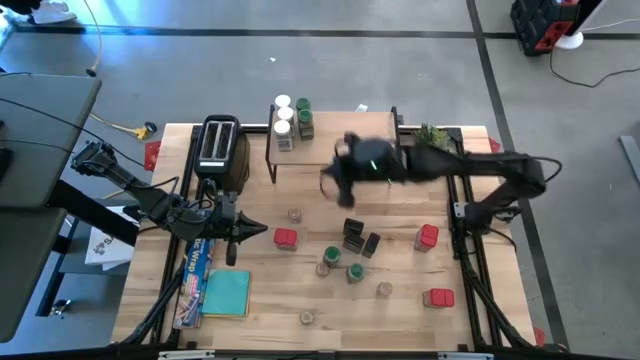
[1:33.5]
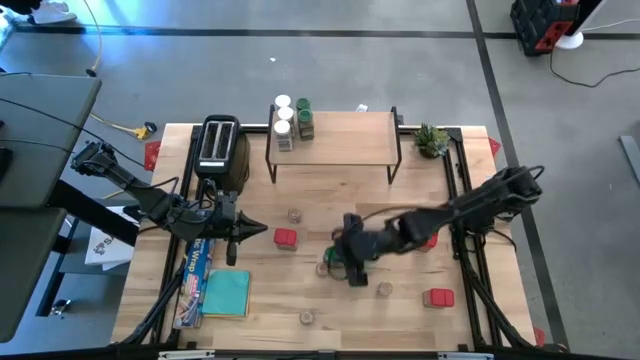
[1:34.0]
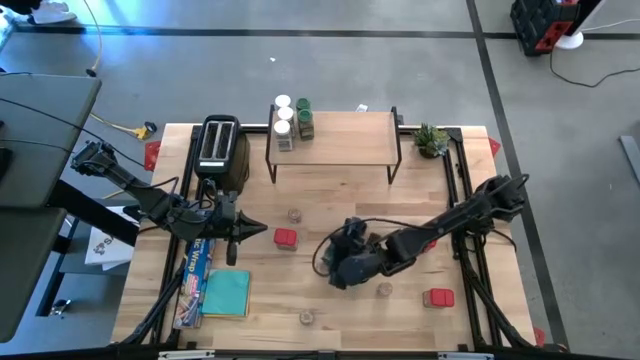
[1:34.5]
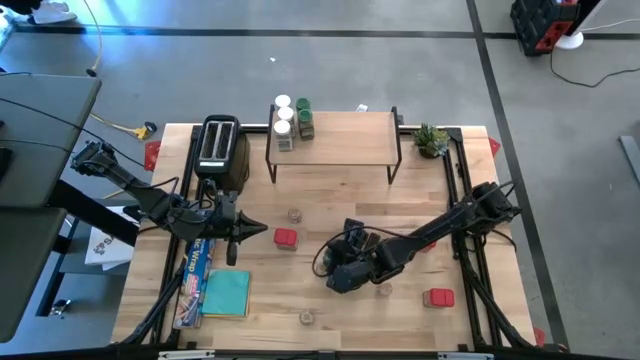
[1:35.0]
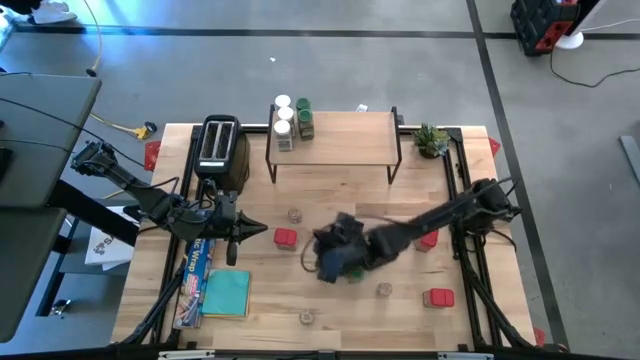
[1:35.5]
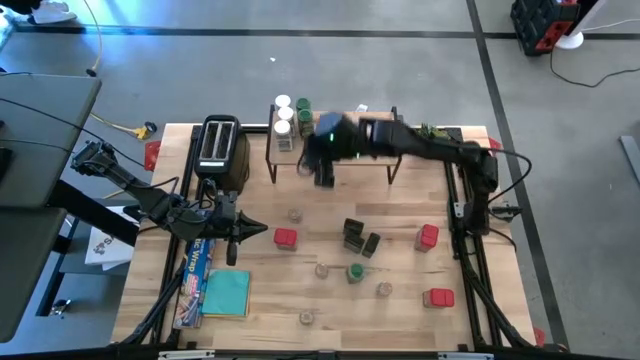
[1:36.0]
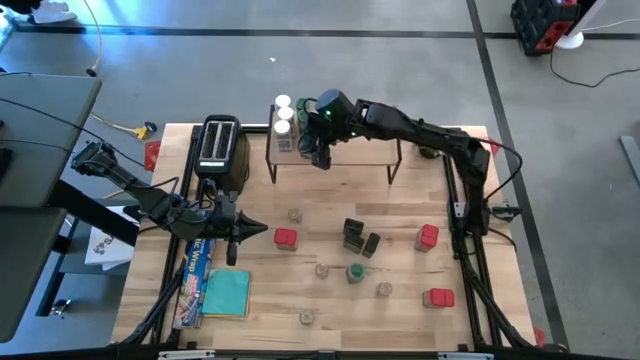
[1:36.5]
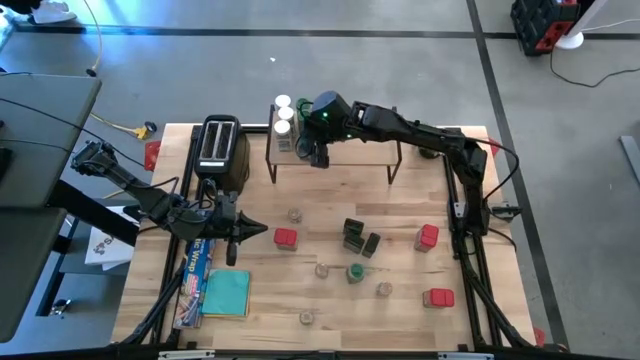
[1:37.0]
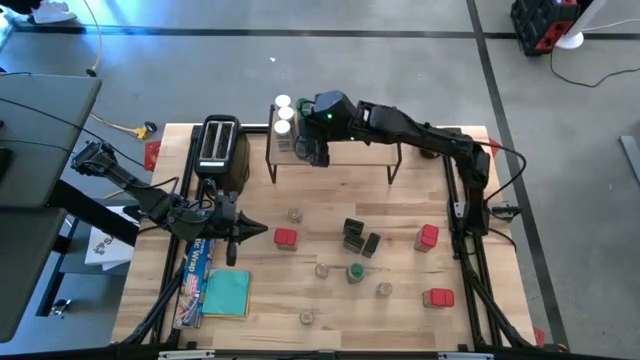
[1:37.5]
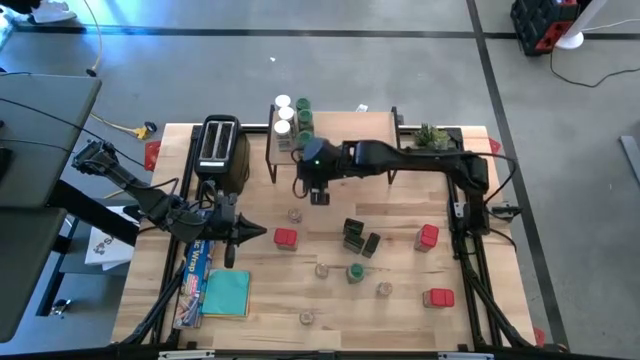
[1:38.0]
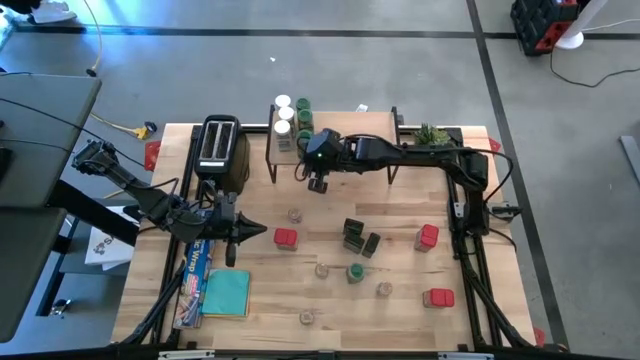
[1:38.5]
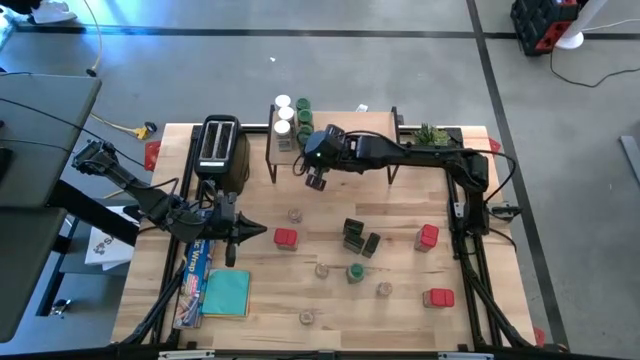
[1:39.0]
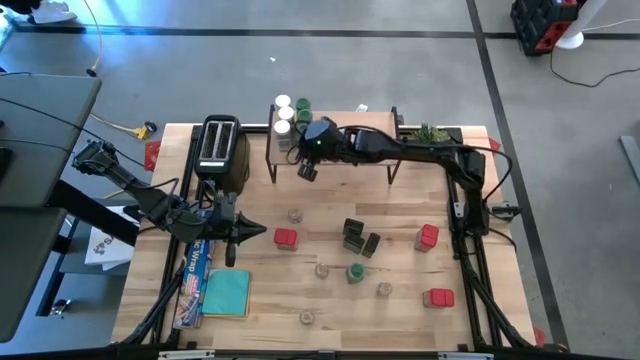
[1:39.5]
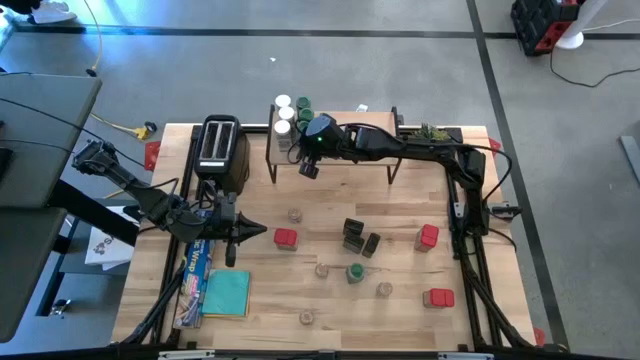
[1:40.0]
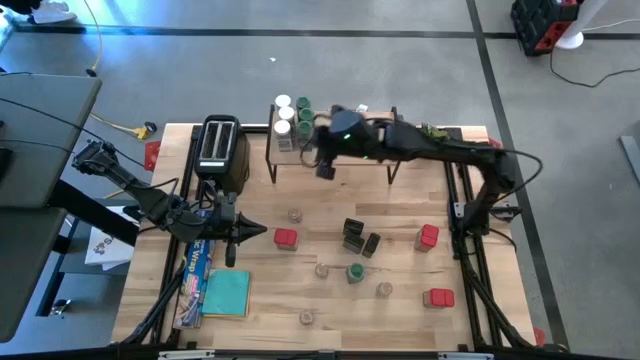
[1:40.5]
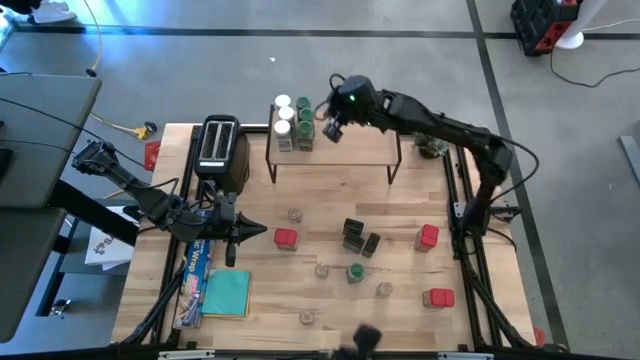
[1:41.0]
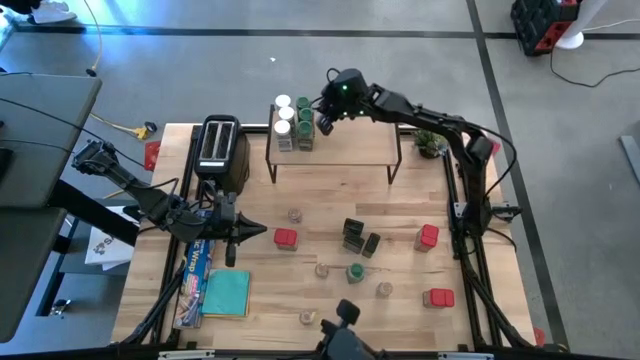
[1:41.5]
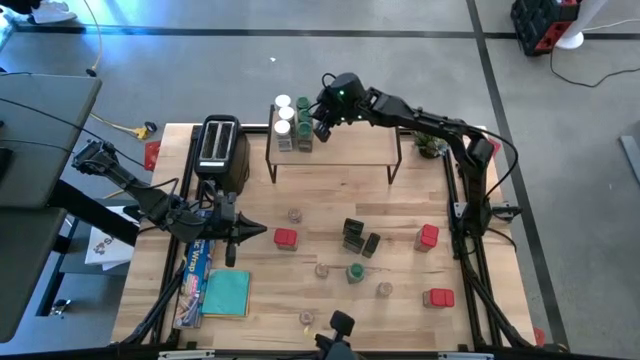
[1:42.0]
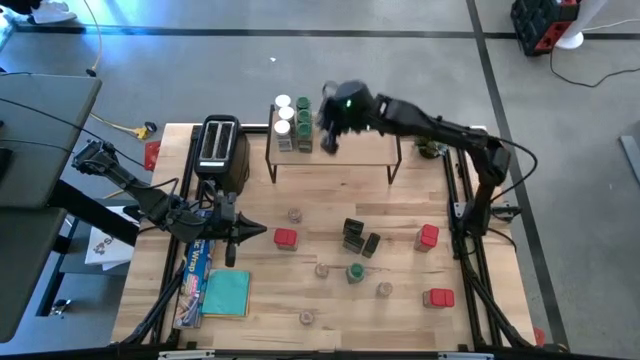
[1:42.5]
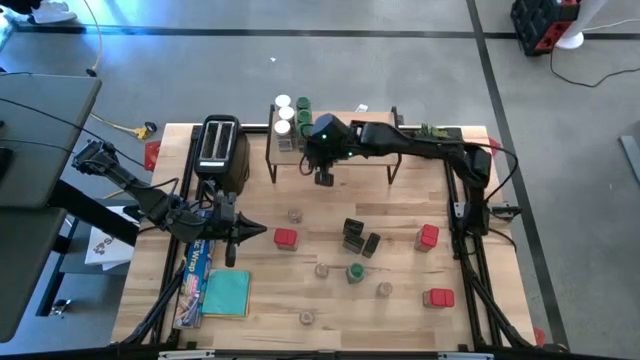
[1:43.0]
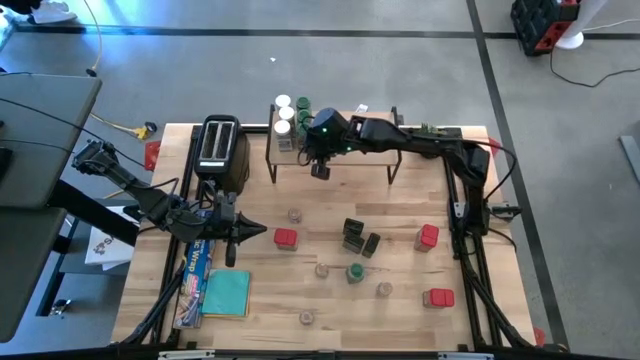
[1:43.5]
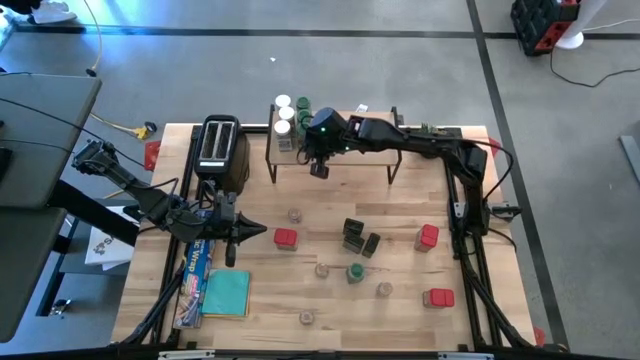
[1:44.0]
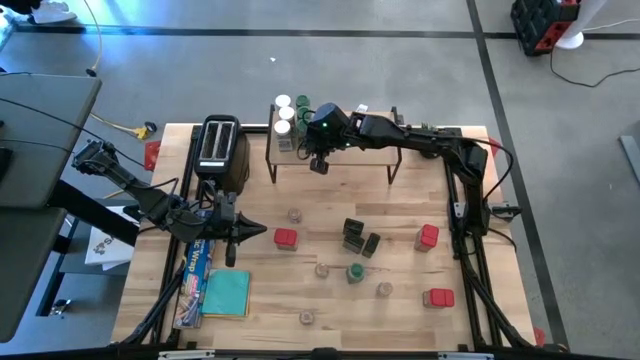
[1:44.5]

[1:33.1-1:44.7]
Task: Shelf spices
Put the left green seasoning bottle on the shelf aligned with the other green seasoning bottle

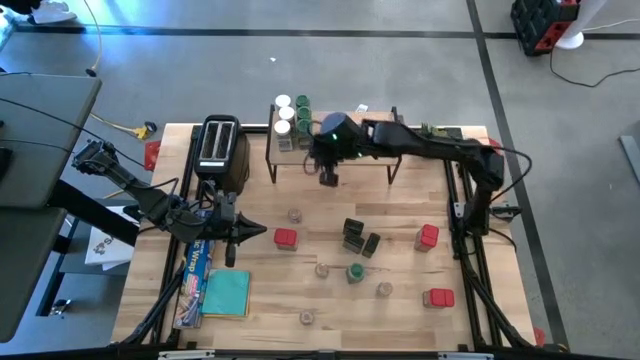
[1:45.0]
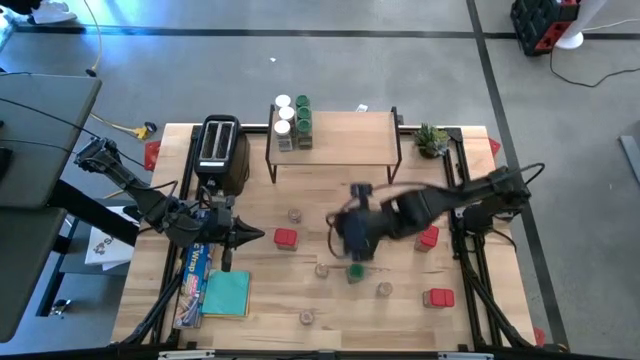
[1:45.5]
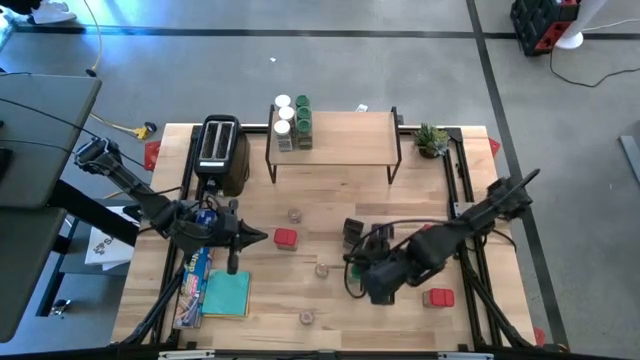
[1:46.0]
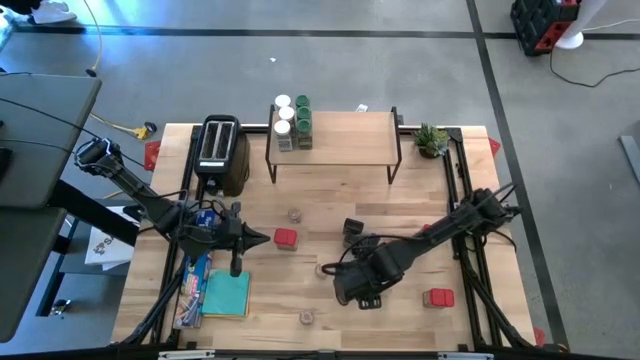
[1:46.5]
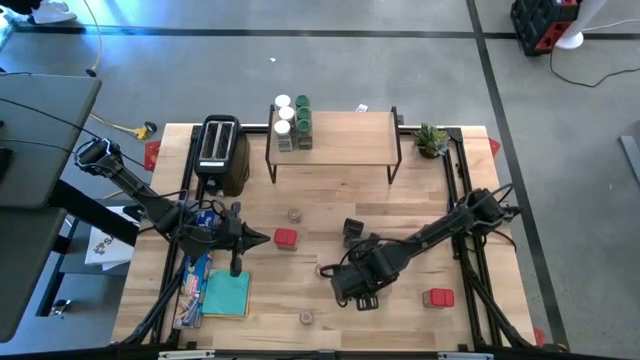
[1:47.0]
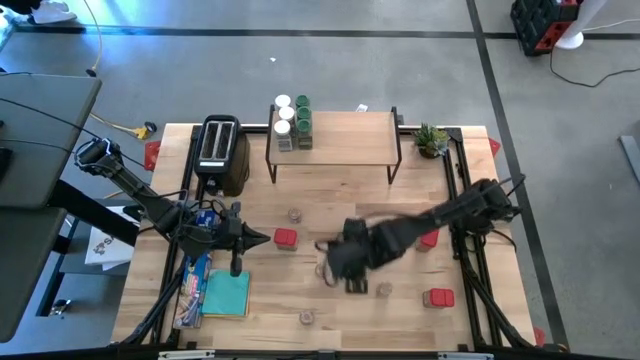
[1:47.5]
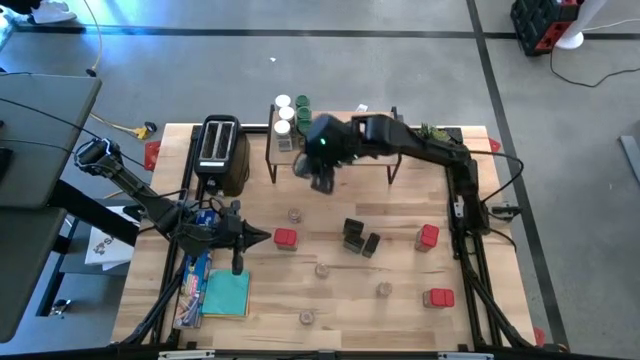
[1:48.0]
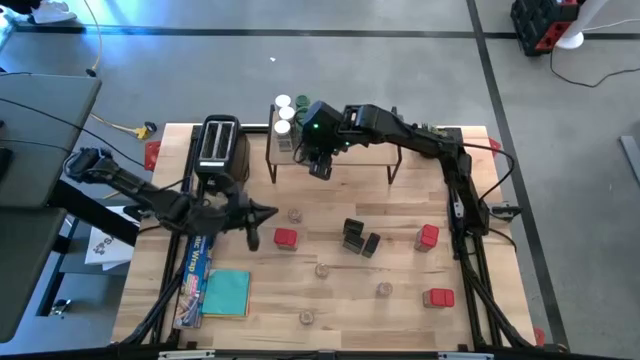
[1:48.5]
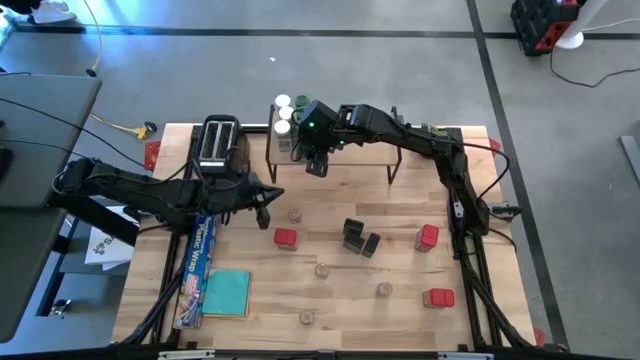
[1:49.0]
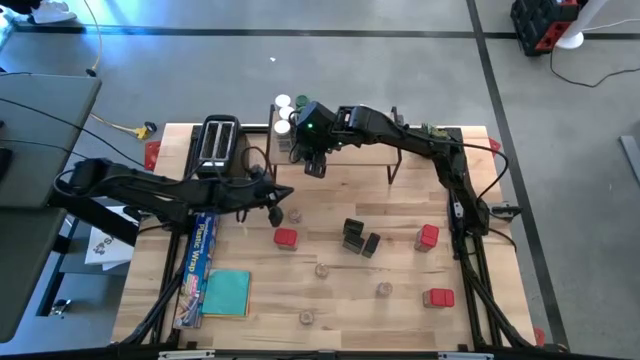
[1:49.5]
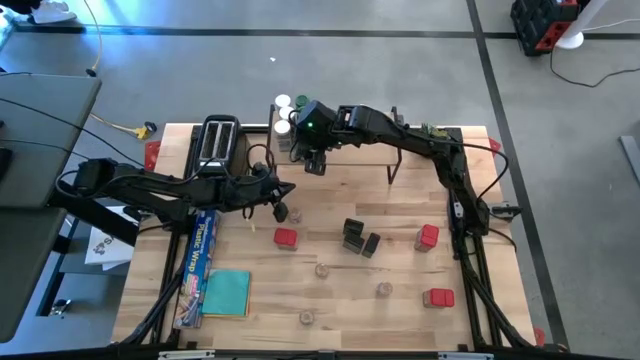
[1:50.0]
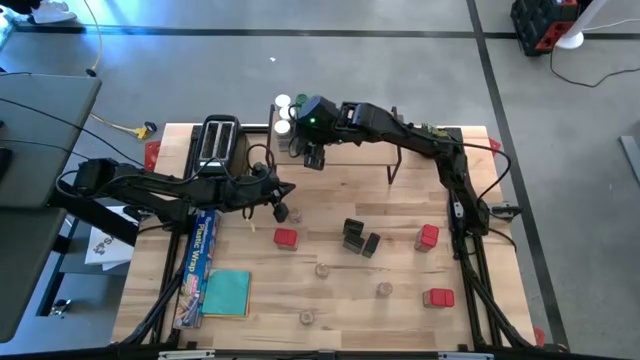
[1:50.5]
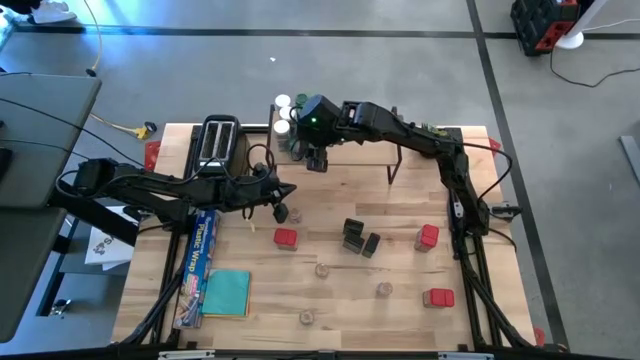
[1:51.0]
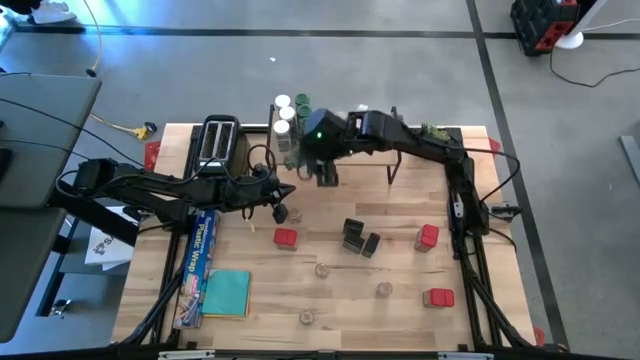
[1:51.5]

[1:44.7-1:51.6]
Put the green seasoning bottle on the shelf aligned with the other green seasoning bottle

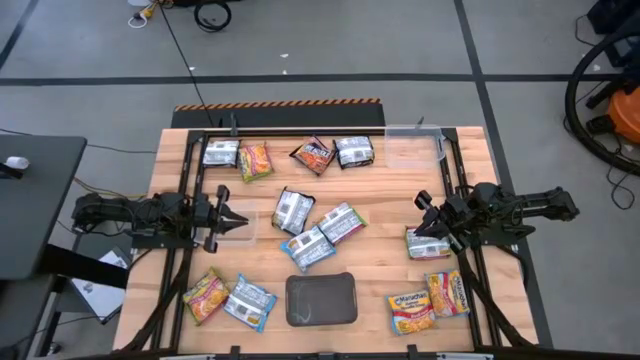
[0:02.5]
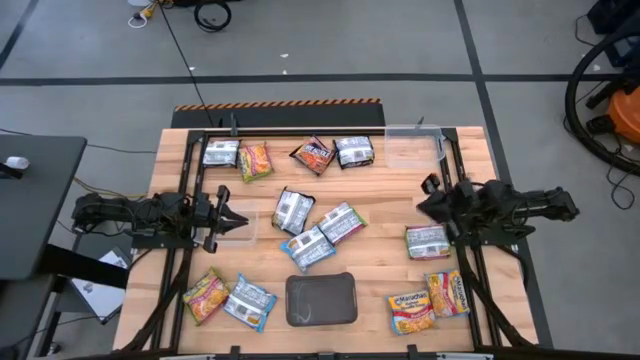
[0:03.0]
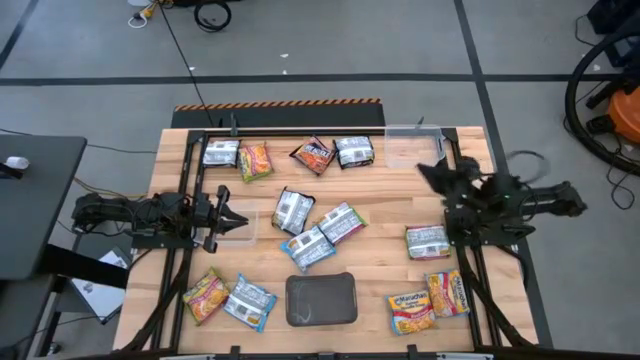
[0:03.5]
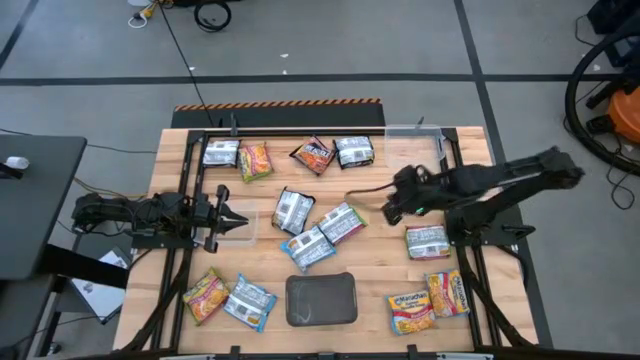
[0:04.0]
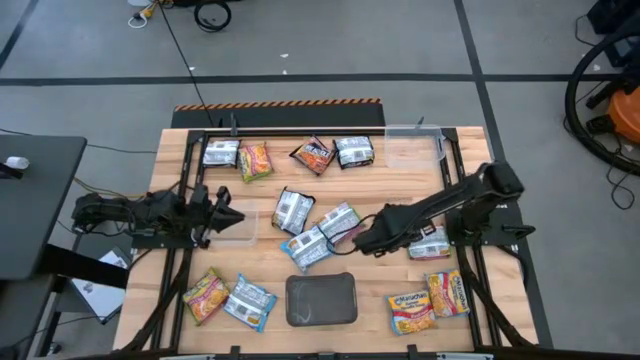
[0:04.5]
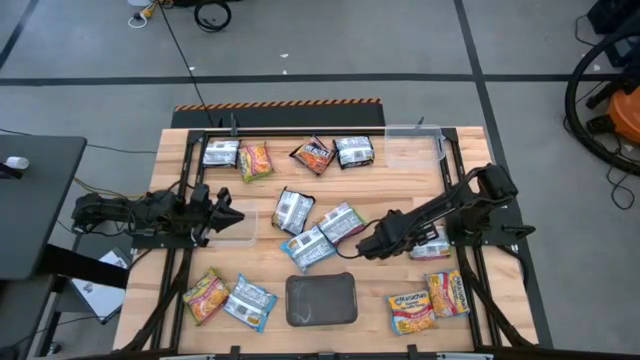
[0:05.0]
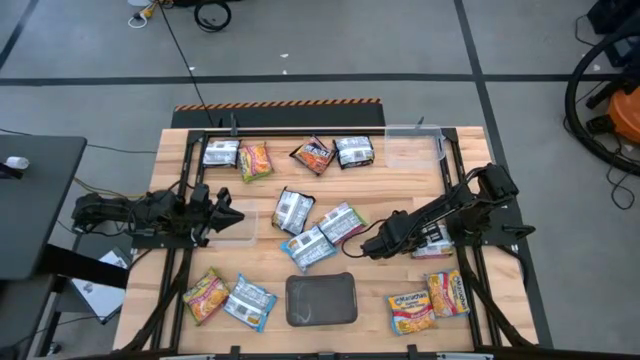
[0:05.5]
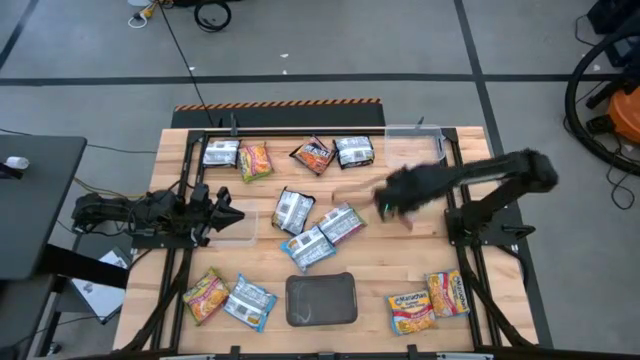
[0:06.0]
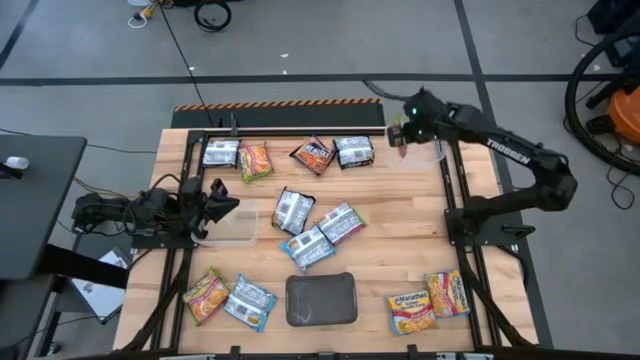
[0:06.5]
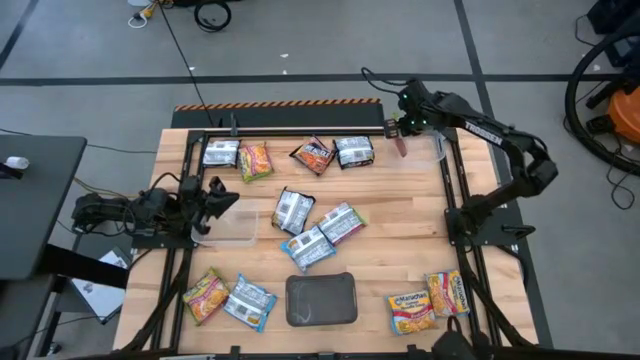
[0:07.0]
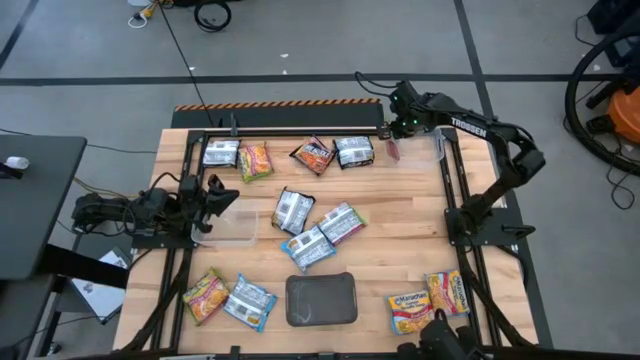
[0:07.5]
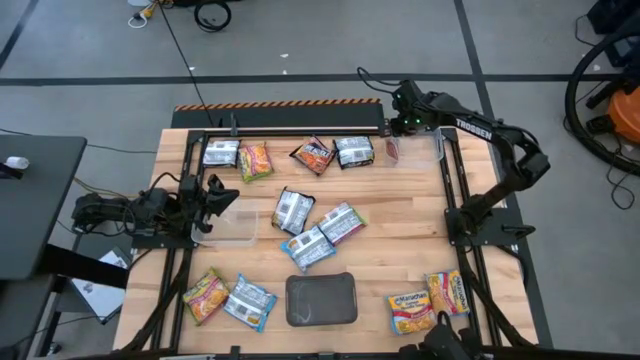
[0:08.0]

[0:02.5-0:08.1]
Task: Sort Maruchan noodles
Put the green noodle pack into the top transparent bin
